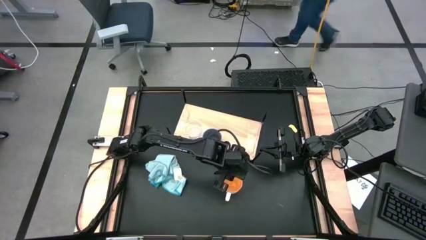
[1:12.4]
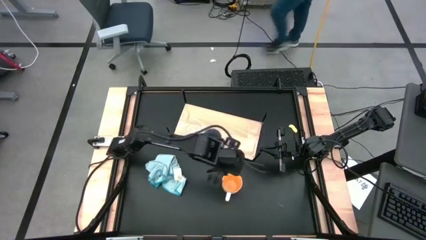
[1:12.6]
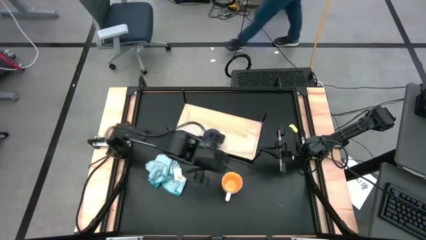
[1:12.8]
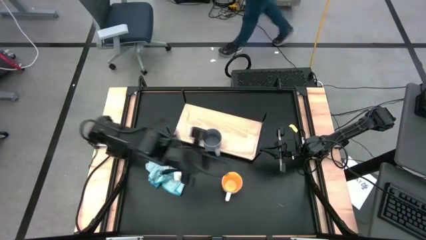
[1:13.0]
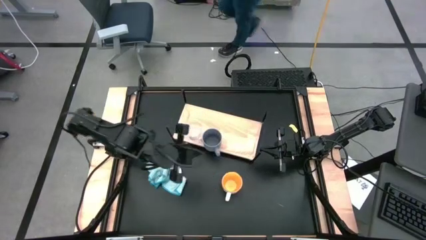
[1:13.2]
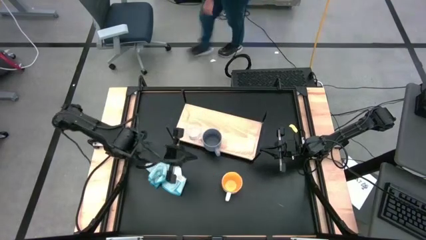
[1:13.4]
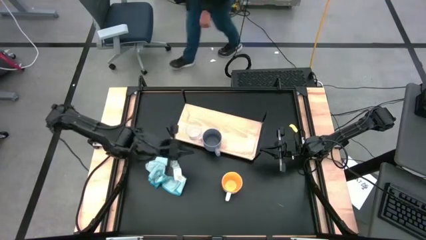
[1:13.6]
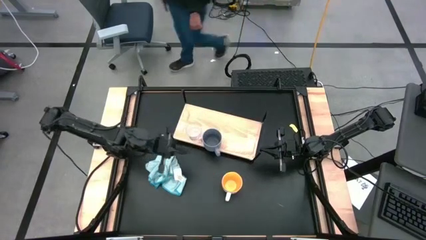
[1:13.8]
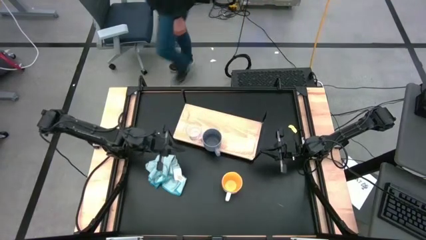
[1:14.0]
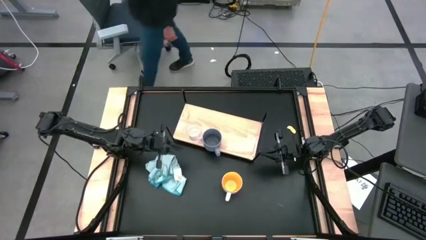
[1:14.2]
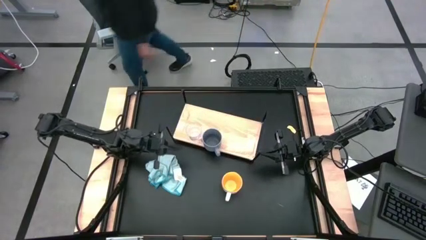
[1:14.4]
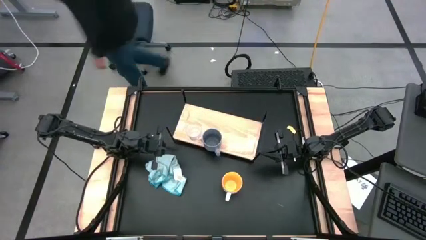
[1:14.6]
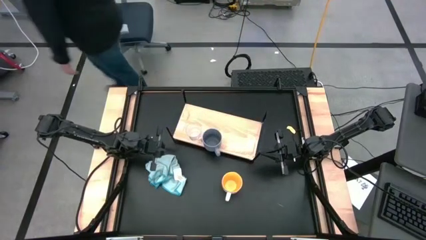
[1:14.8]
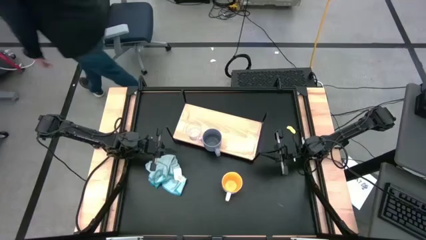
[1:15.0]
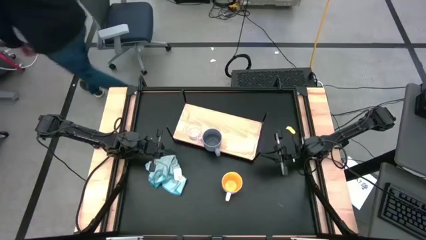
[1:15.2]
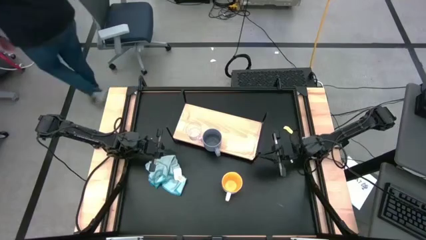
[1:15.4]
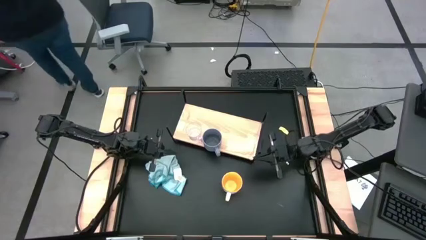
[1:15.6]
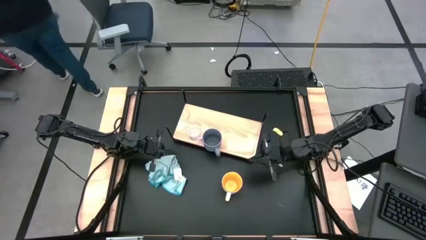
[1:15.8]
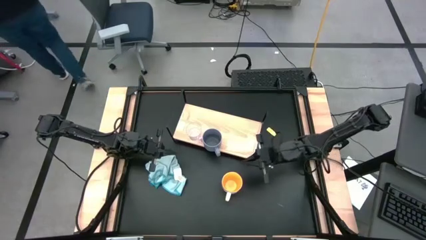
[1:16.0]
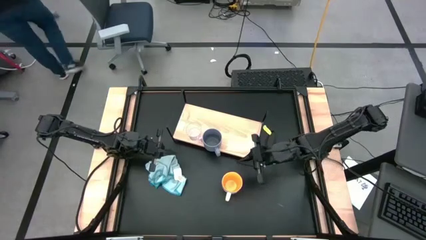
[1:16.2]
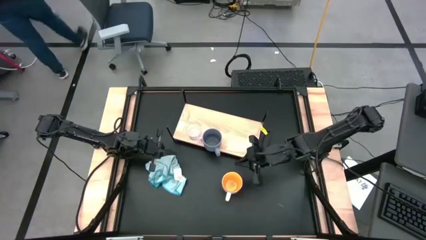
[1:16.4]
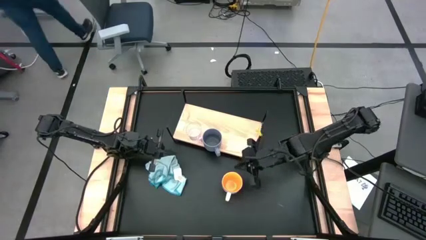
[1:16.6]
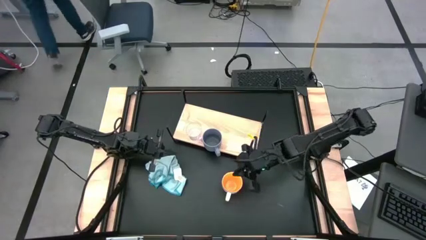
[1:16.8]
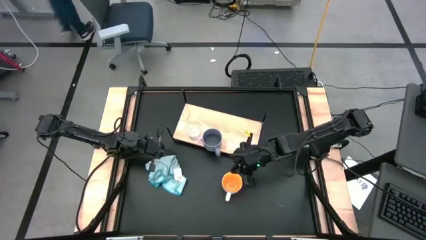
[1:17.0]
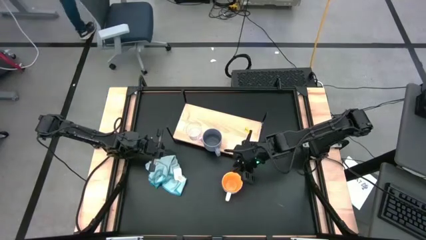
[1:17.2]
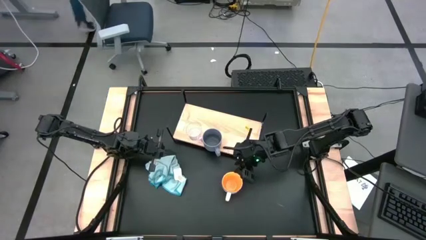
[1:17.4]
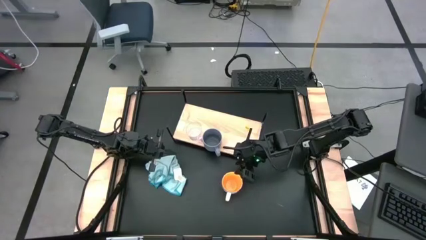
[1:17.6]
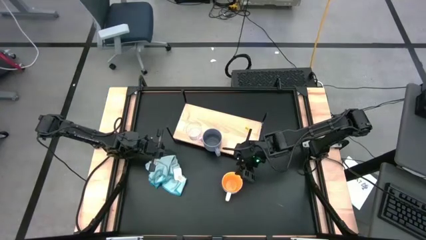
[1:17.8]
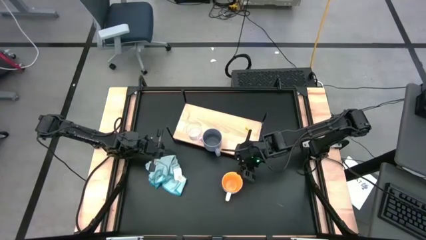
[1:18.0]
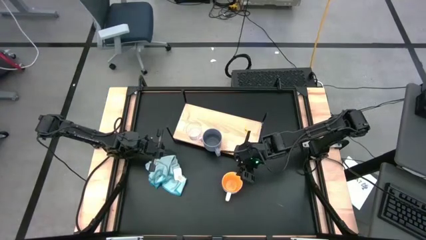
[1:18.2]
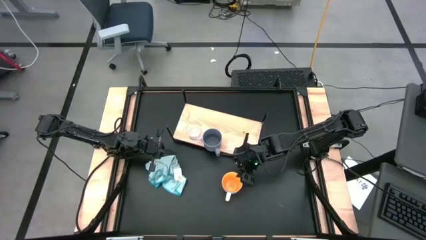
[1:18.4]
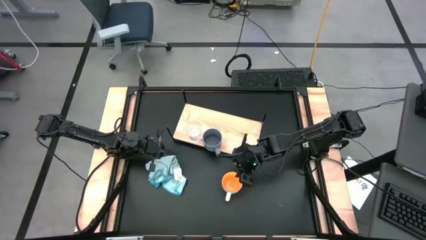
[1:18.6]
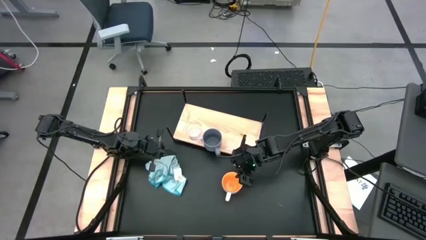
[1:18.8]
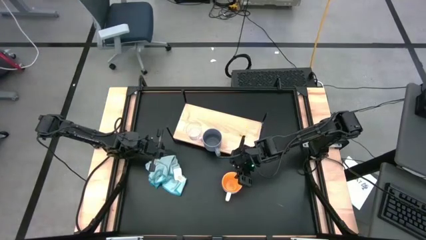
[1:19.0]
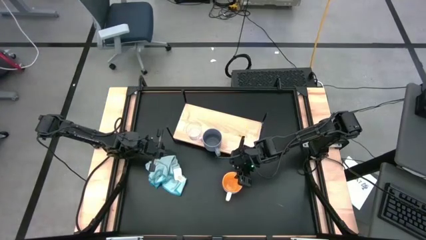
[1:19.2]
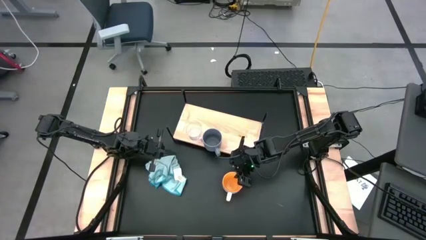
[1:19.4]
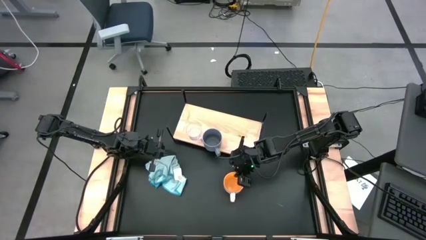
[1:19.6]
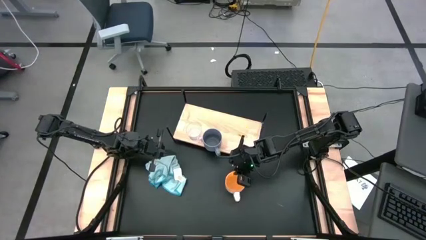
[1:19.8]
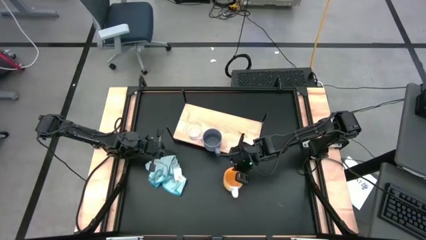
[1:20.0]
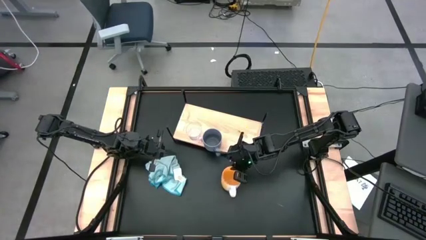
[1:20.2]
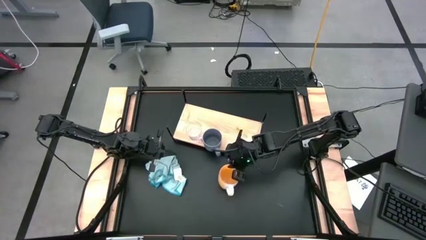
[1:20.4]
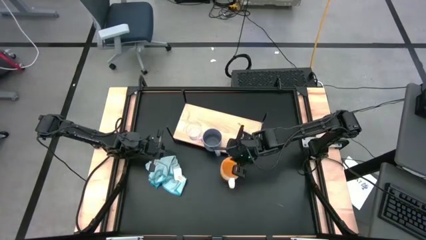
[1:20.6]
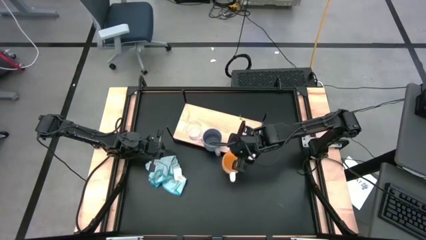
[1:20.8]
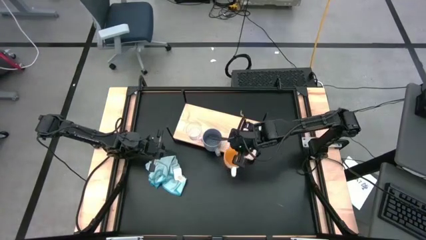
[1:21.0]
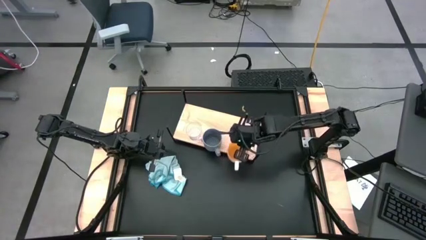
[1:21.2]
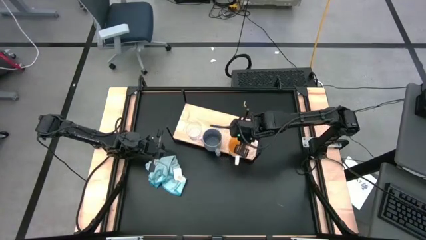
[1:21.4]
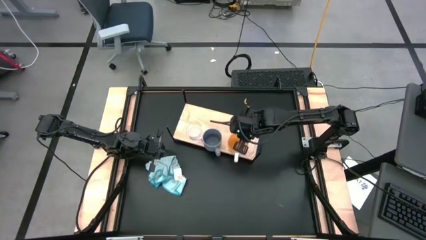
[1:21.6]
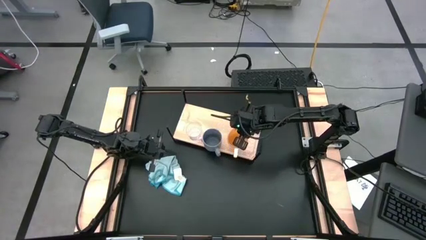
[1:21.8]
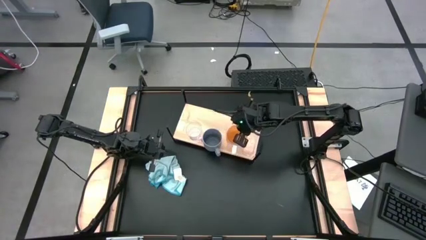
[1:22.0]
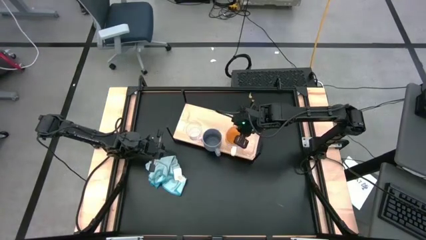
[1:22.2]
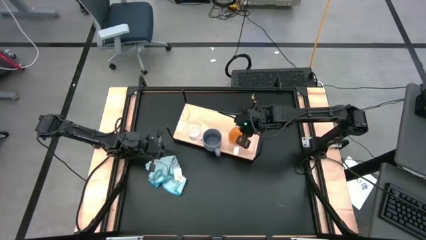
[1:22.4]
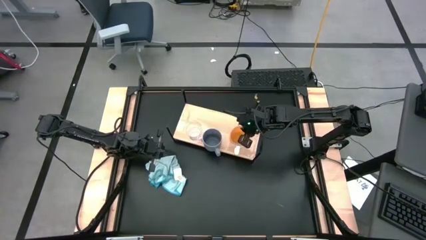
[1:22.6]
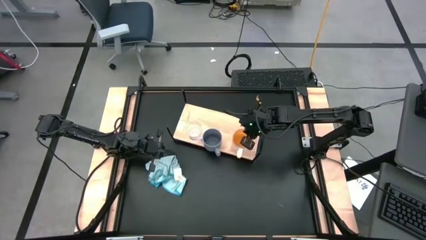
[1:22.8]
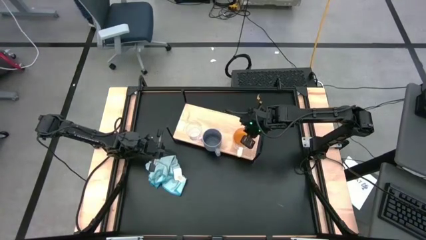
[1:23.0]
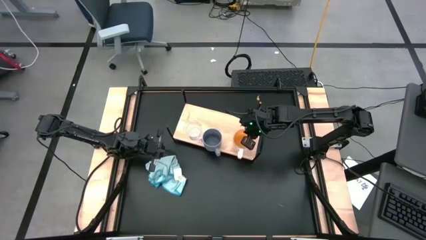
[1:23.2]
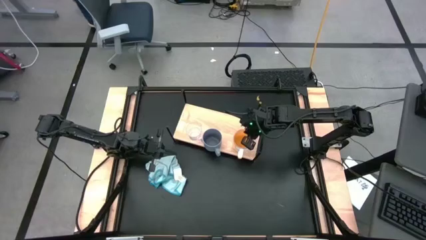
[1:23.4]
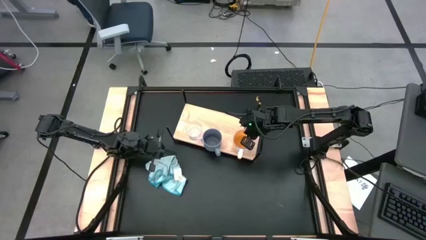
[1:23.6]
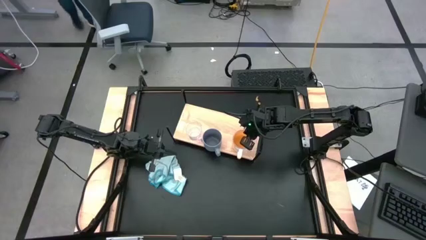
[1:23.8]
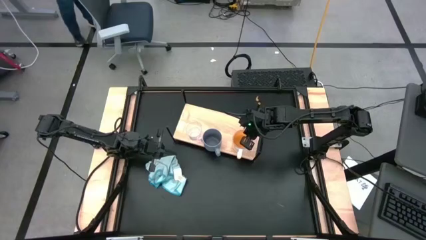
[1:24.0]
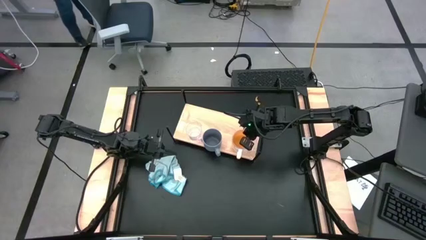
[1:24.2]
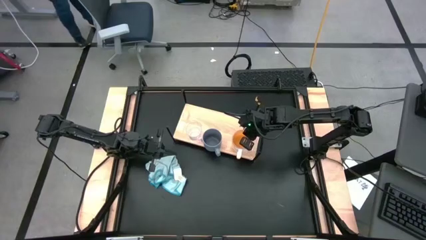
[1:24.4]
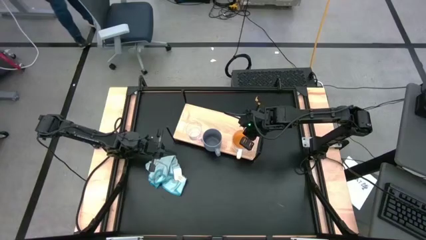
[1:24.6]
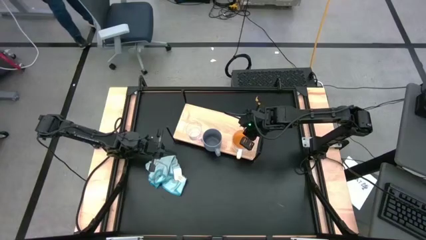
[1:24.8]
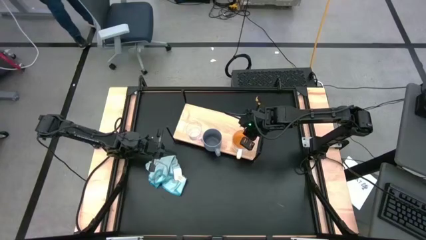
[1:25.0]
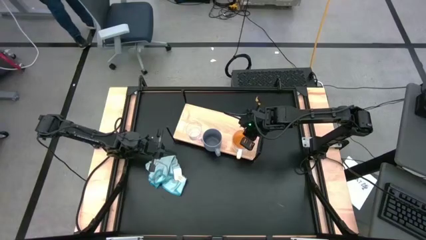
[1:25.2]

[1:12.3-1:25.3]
Task: Stack small to large cups/mugs on shelf
Put the yellow mug on the shelf

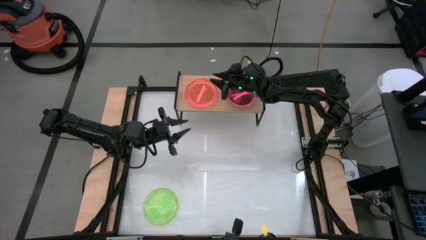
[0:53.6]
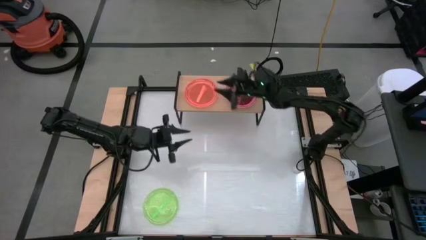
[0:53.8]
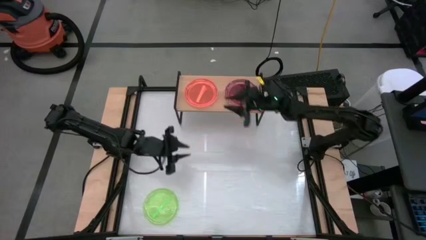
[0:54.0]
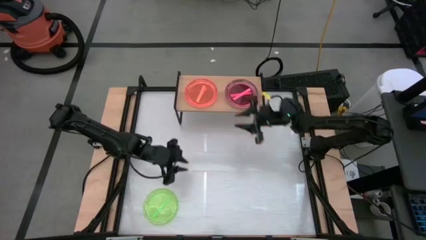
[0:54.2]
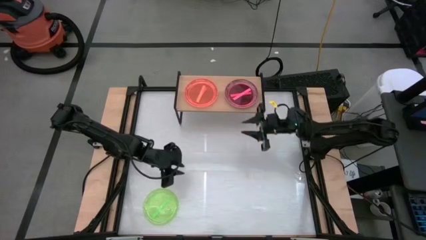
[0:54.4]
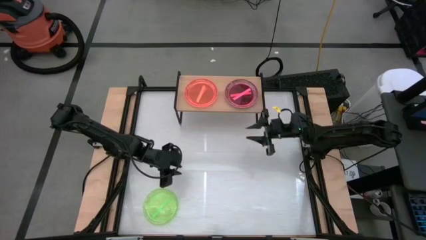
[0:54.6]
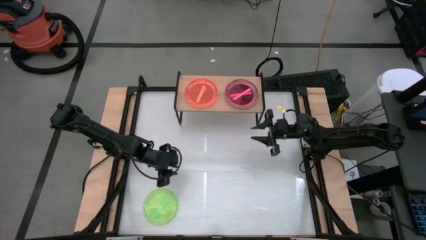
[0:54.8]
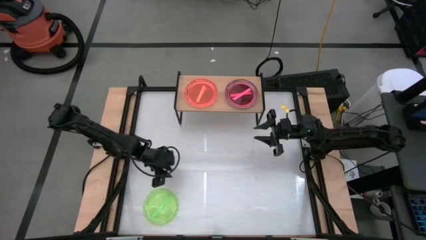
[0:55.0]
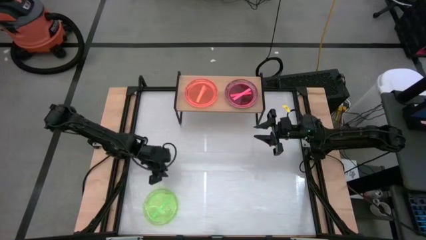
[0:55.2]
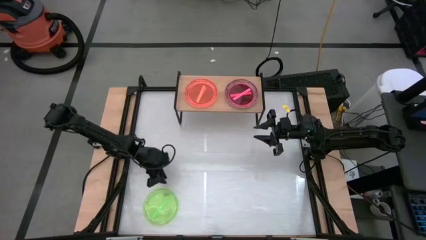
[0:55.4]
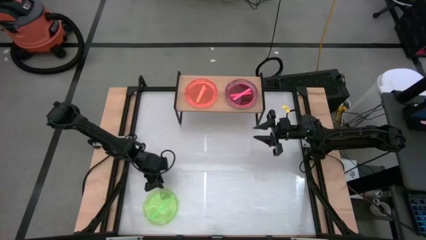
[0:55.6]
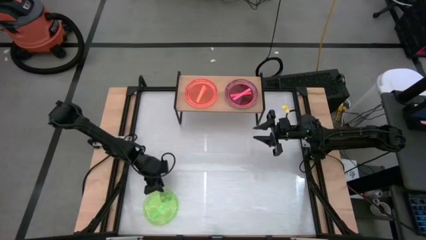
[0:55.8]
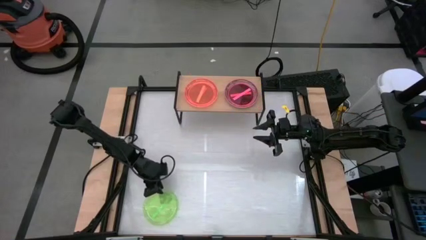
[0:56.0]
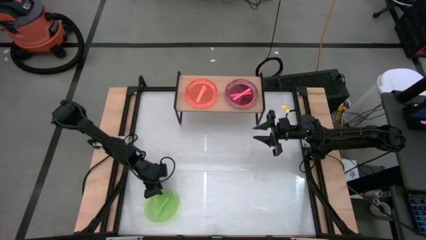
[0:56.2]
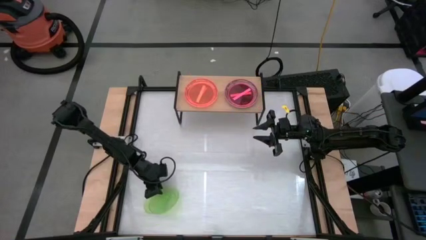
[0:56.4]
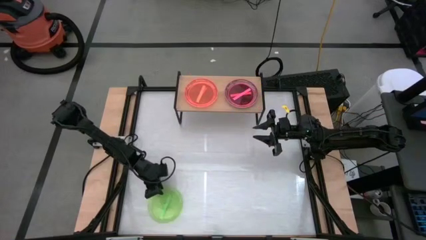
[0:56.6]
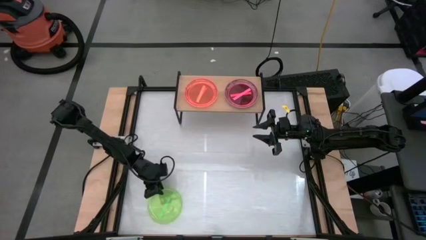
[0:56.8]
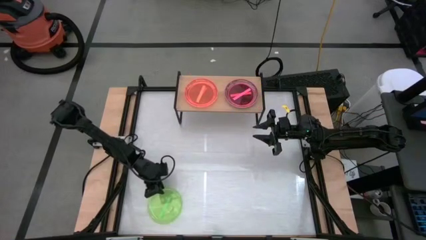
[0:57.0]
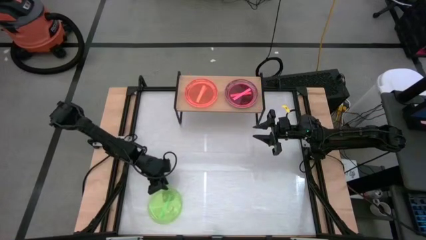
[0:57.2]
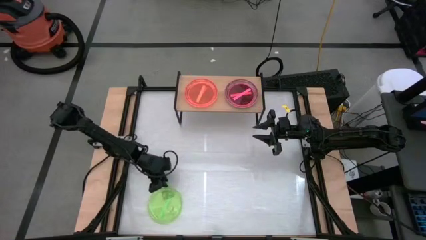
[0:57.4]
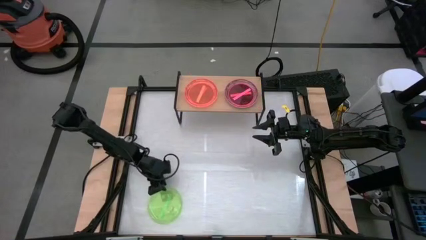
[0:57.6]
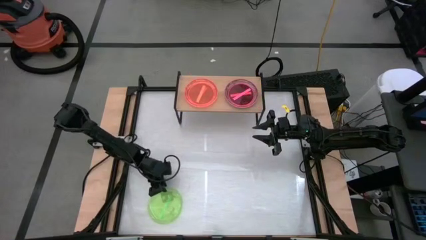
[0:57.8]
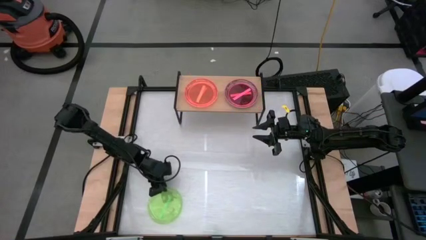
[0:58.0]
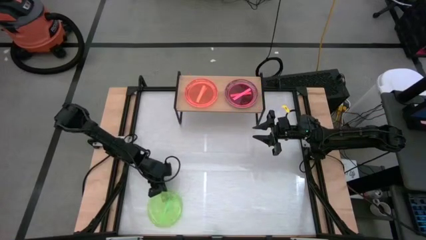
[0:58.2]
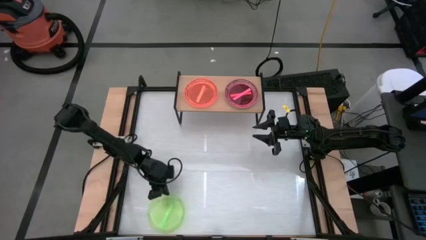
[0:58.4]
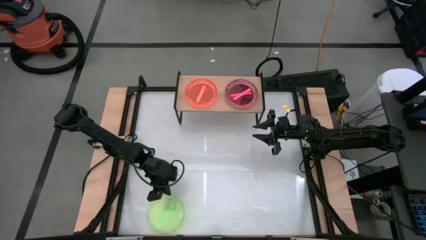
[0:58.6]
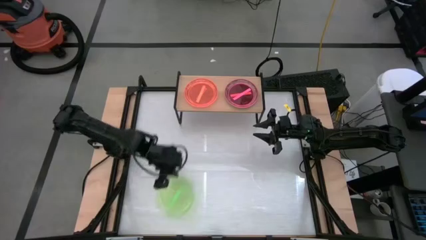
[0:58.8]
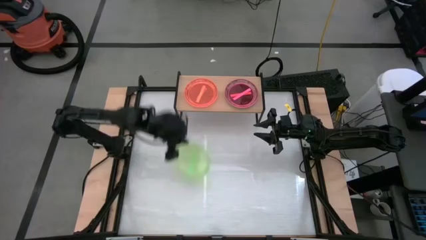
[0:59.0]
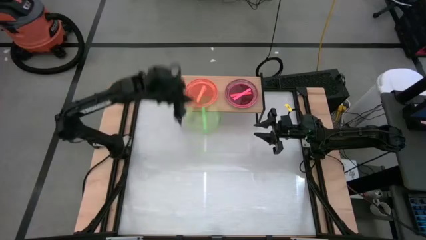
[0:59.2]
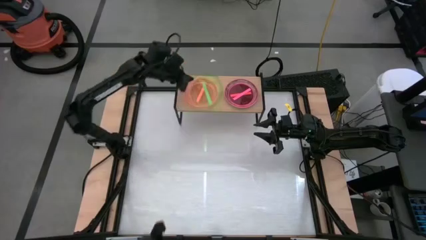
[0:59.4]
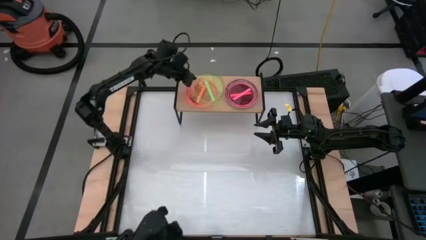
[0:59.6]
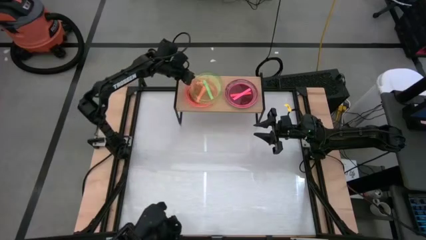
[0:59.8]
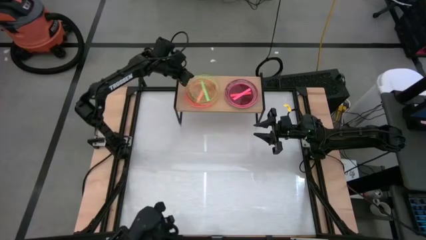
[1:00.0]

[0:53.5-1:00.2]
Task: Place and stack plates onto a shelf
Stack the left green plate on the orange plate on the shelf
